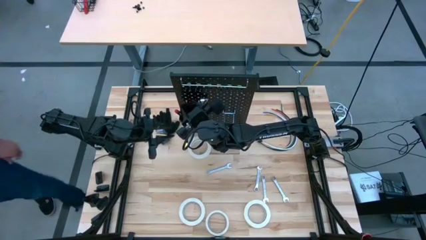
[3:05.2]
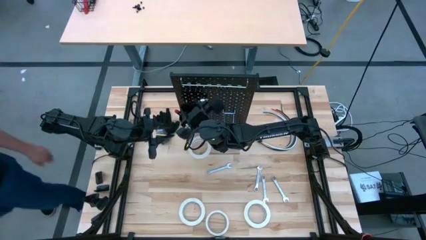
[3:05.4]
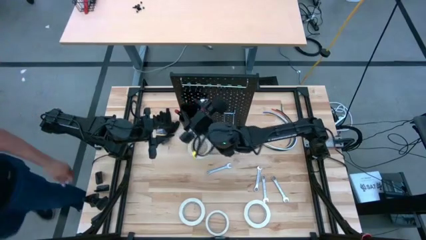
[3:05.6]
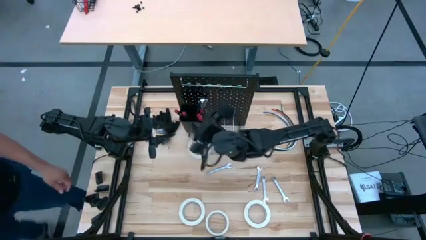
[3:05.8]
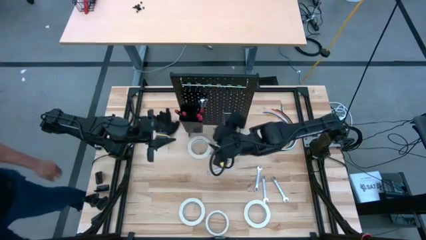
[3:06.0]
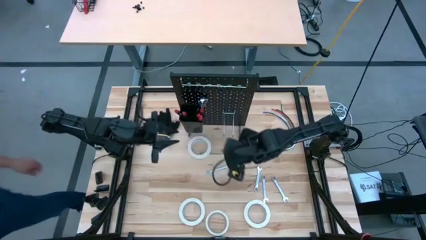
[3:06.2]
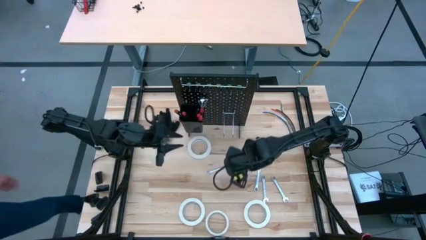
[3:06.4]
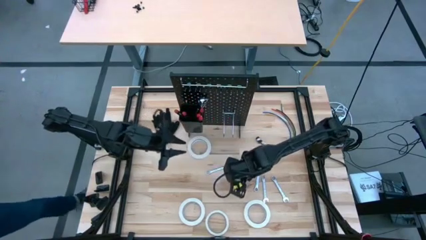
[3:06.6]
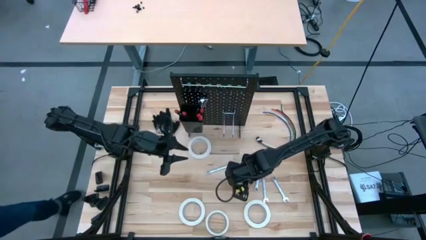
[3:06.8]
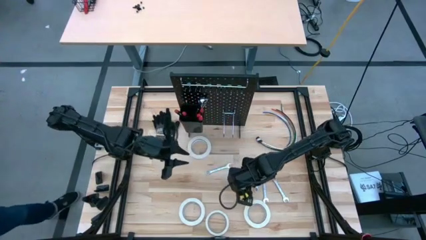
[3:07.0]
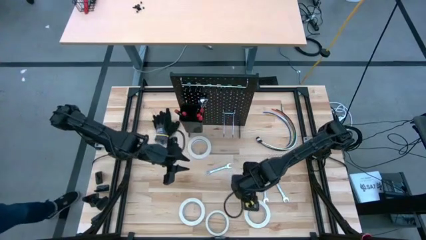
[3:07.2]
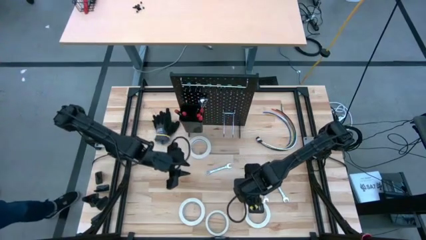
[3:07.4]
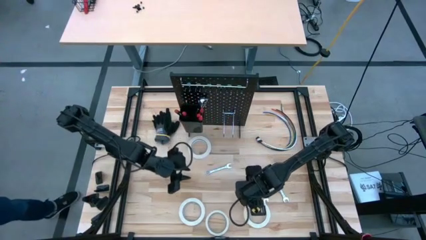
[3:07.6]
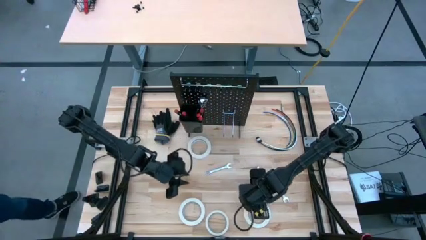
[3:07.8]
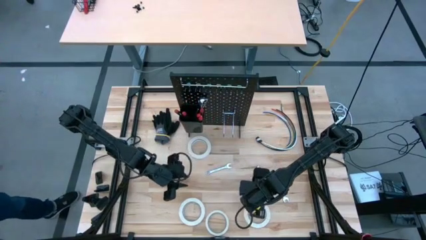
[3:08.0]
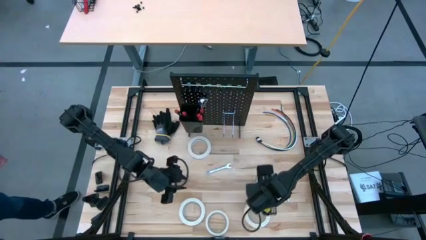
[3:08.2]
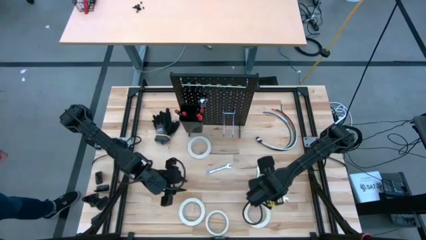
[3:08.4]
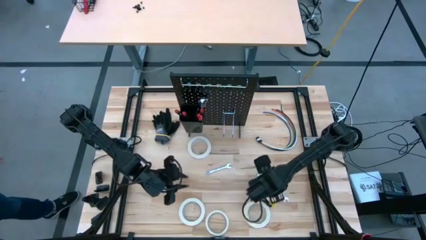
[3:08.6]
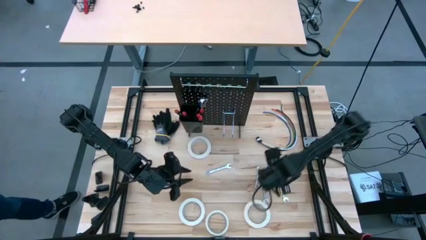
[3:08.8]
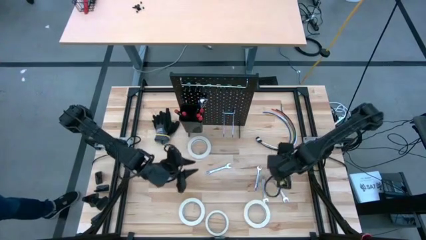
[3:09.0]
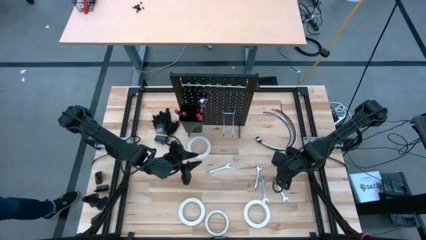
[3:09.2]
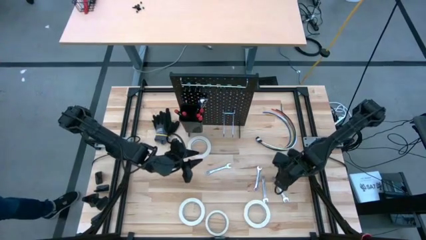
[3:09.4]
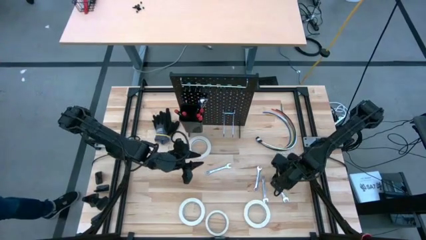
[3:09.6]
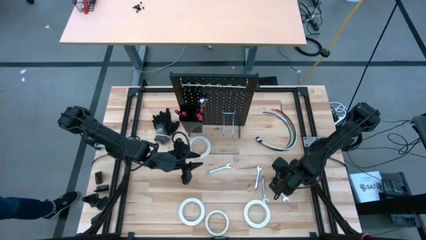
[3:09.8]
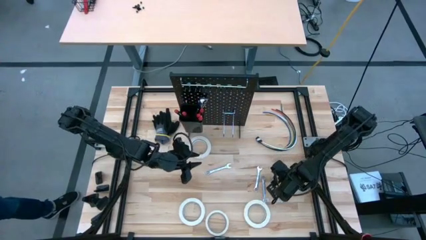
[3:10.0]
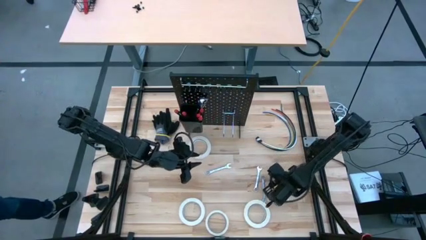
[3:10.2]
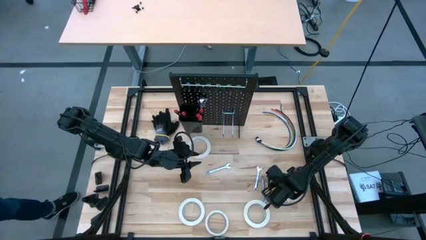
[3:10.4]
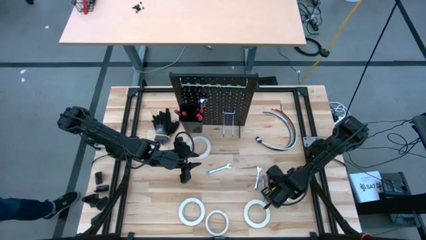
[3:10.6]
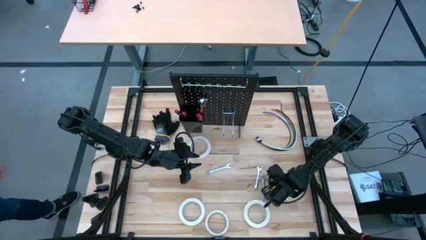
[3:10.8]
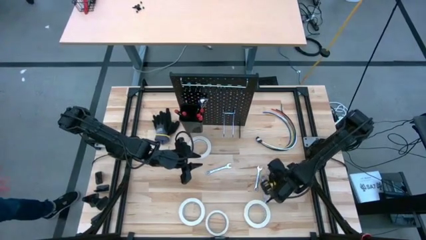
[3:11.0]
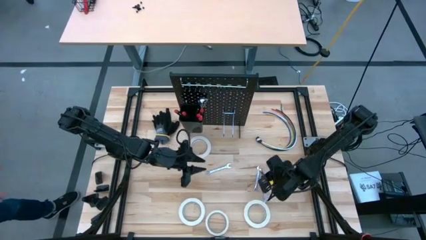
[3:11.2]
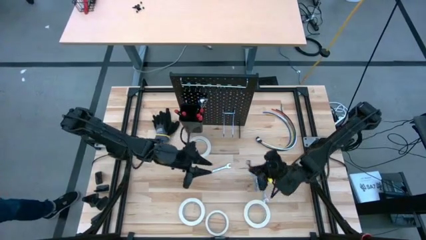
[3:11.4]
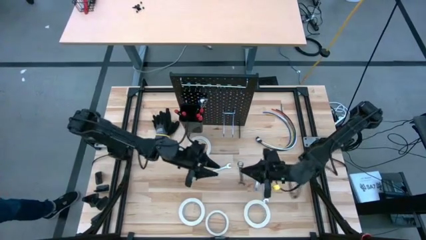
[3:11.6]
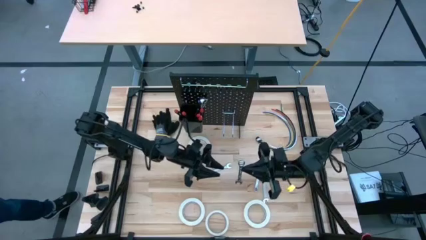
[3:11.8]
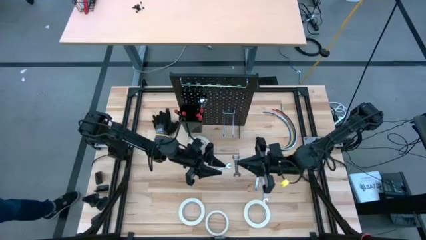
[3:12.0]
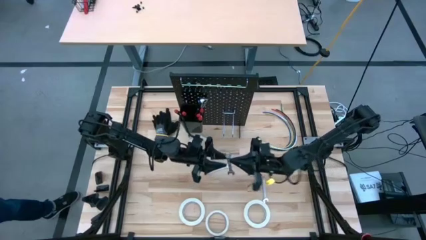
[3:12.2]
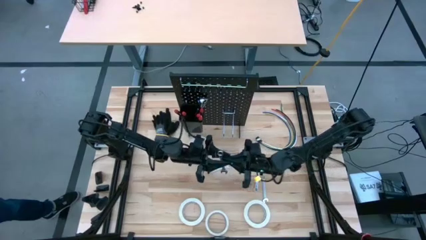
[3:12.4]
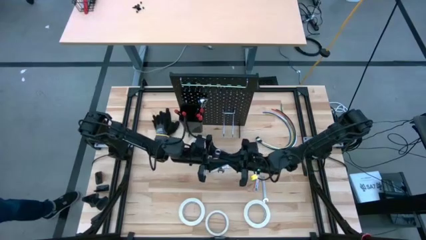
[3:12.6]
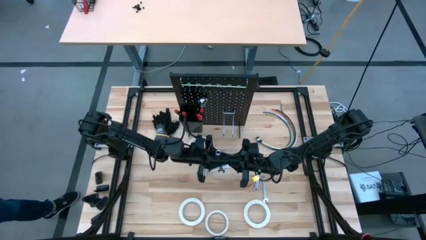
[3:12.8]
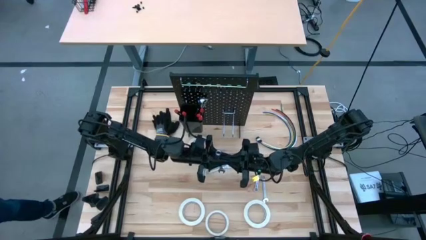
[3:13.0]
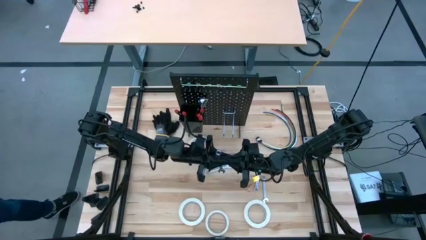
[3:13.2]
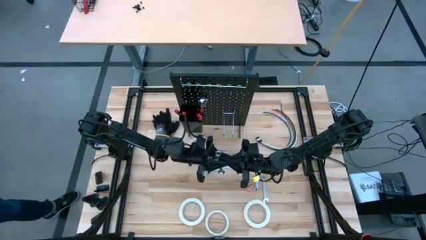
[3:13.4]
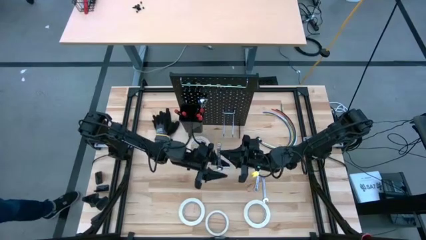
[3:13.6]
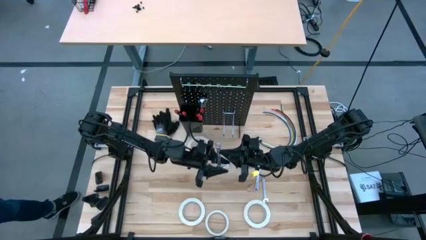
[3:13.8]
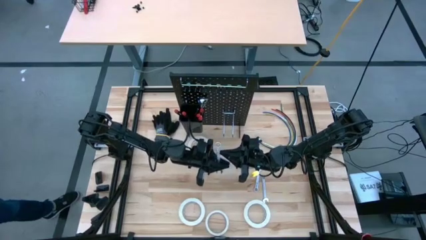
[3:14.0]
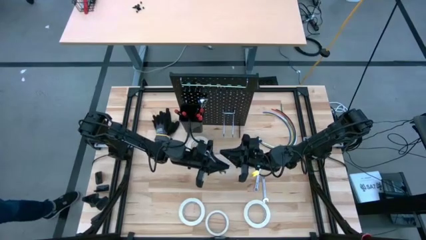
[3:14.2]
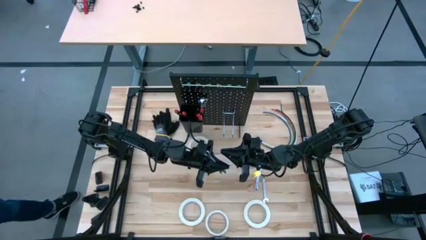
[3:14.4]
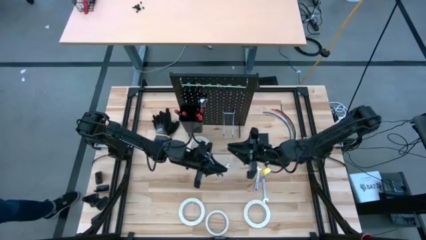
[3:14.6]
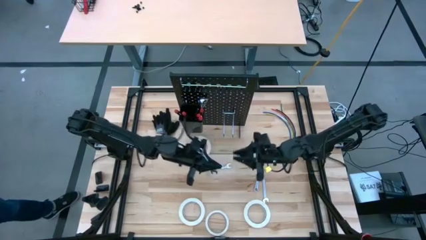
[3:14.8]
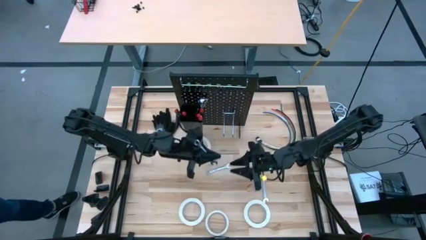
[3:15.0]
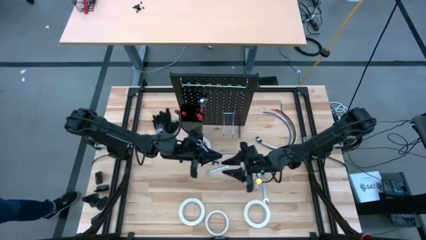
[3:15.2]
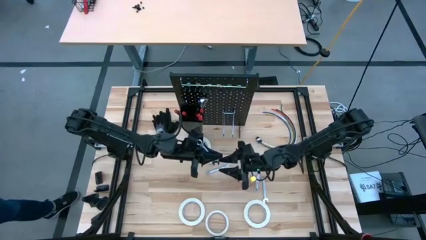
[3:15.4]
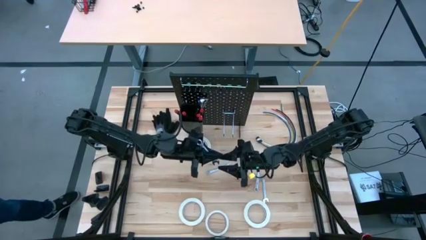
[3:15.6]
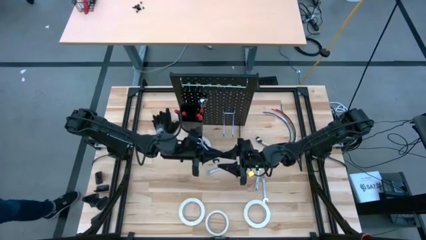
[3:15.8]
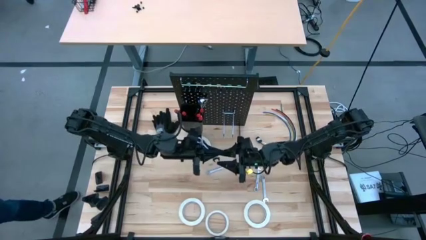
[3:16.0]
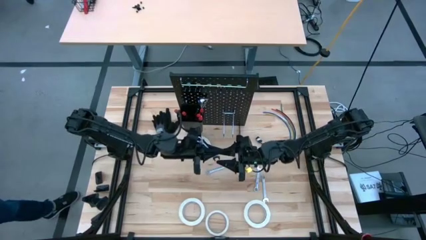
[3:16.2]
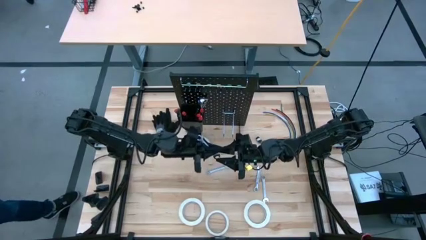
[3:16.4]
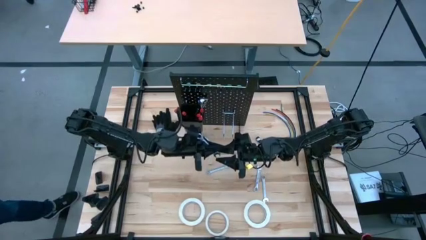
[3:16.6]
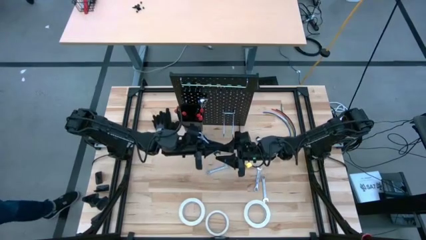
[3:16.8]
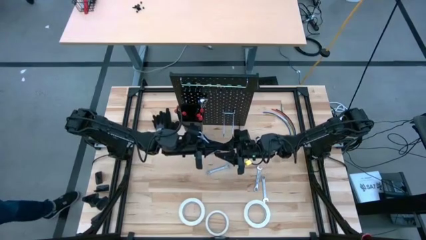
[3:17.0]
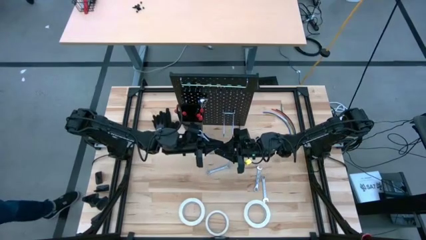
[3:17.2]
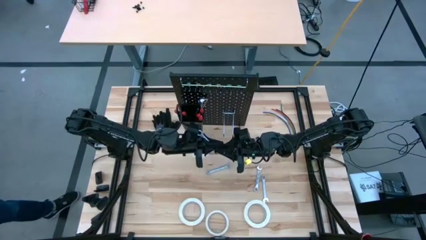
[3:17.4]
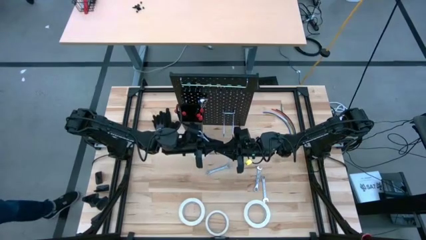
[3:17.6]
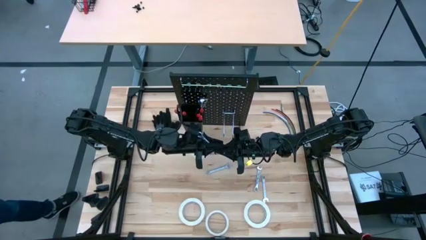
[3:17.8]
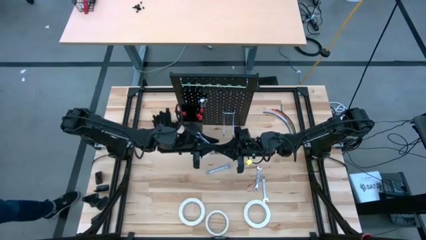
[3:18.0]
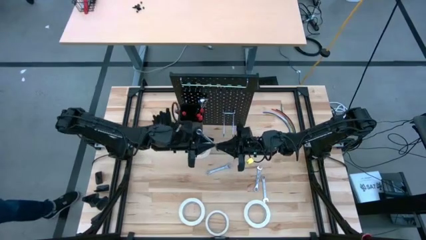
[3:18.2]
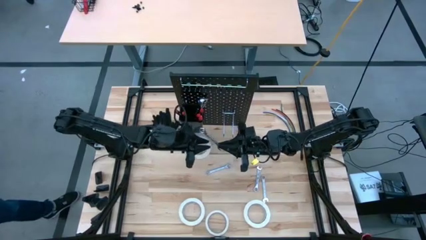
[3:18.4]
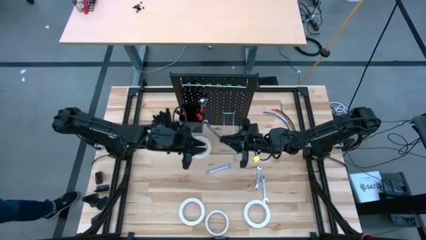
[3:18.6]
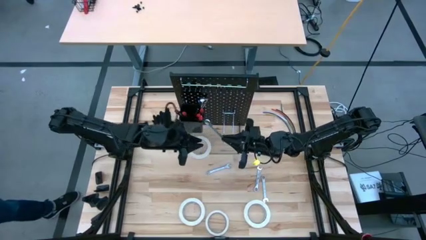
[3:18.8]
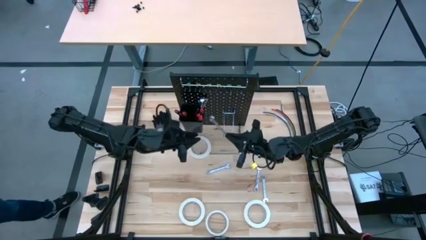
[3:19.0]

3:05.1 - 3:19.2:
Task: Hang tools onto peg board
Hang the silver wrench on the peg board

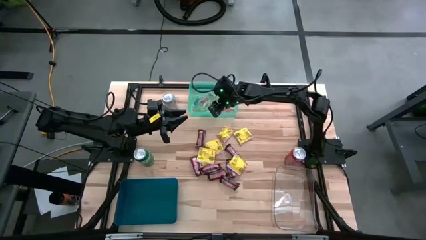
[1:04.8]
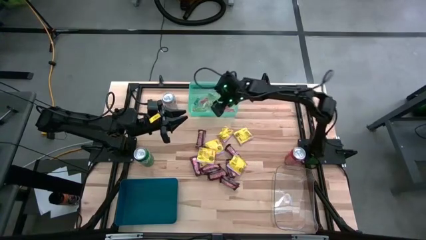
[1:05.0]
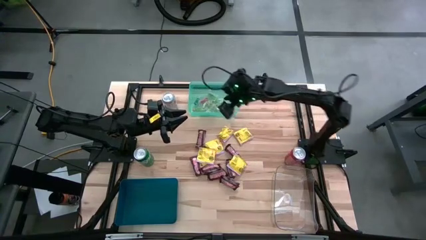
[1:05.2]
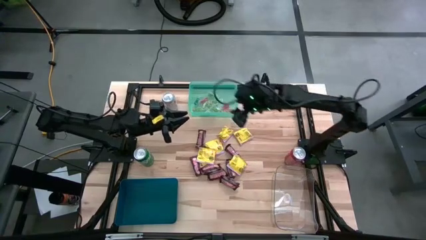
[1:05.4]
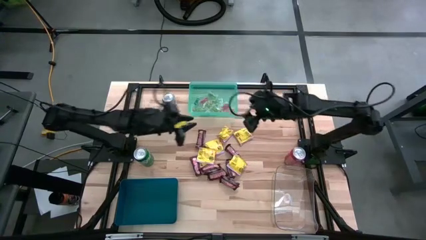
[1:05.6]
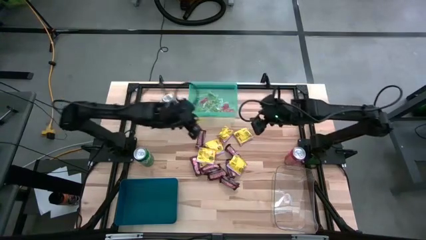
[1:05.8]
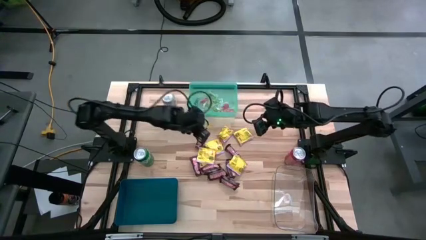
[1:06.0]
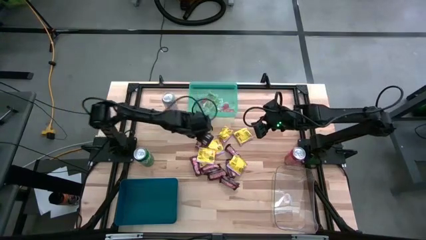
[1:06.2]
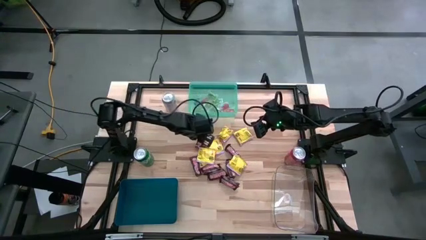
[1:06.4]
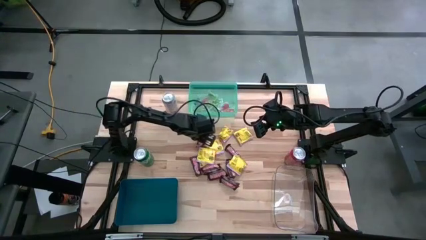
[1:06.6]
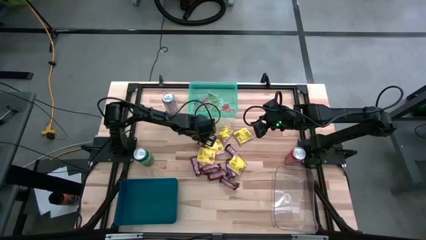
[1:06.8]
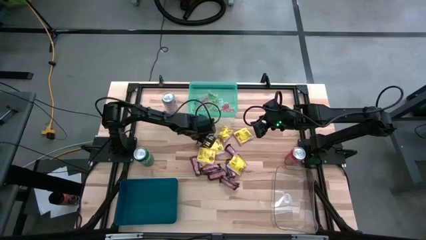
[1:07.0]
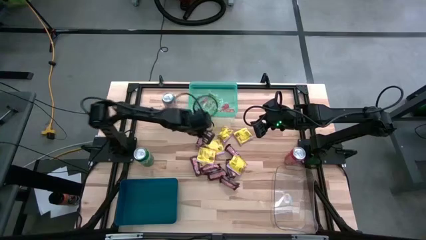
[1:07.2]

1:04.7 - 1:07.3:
Task: Sort candy
Put the brown chocolate into the dark blue bin
